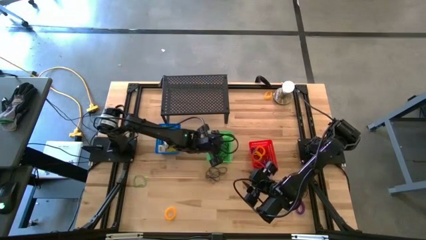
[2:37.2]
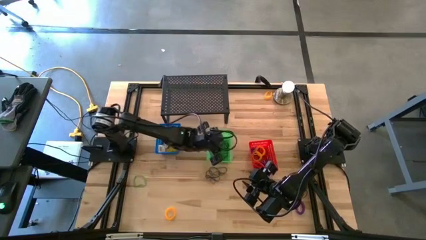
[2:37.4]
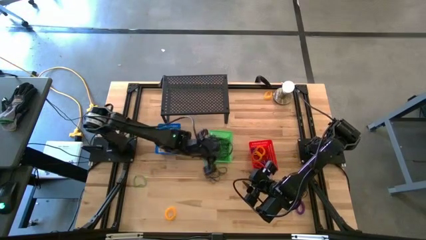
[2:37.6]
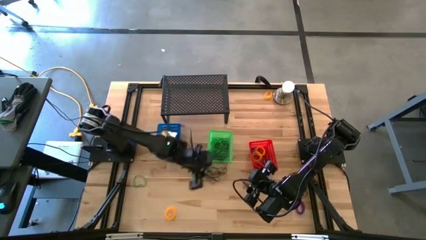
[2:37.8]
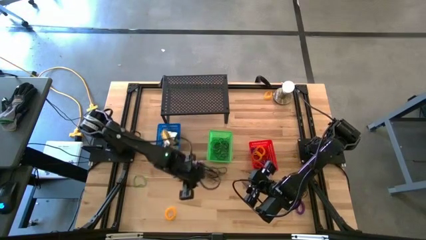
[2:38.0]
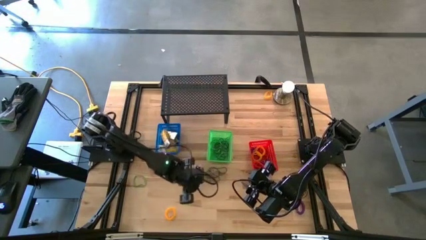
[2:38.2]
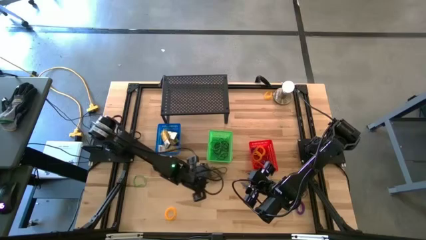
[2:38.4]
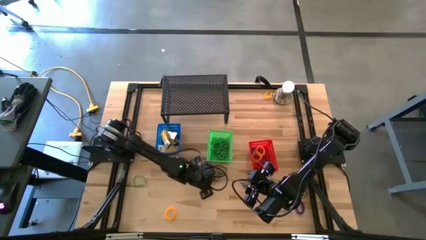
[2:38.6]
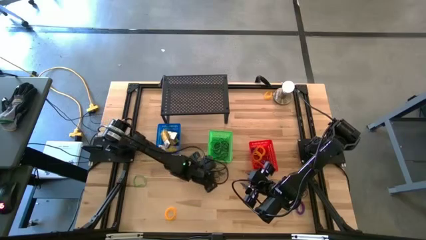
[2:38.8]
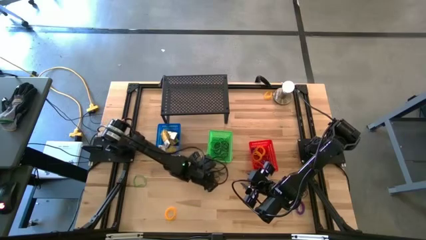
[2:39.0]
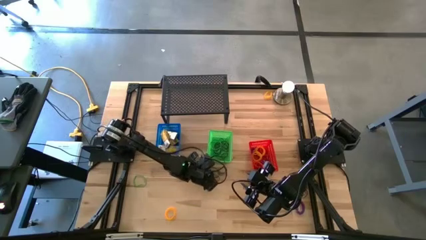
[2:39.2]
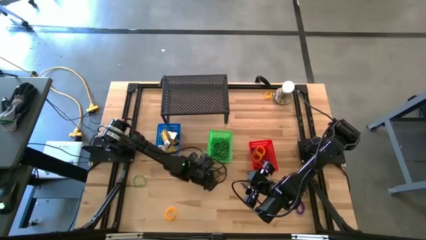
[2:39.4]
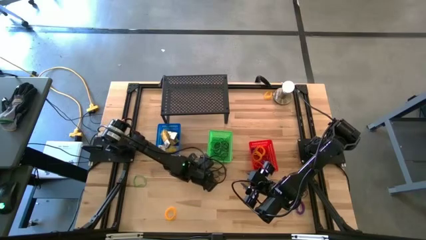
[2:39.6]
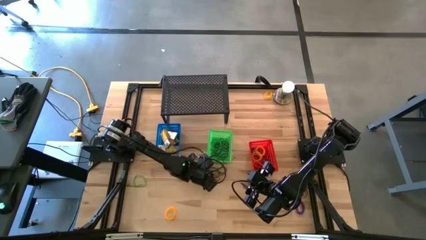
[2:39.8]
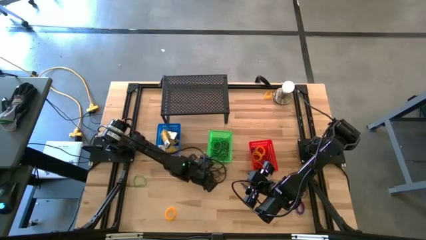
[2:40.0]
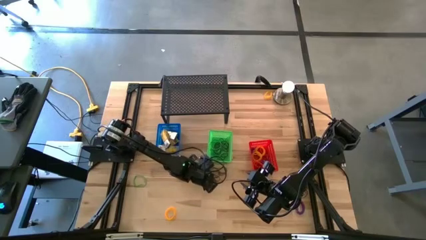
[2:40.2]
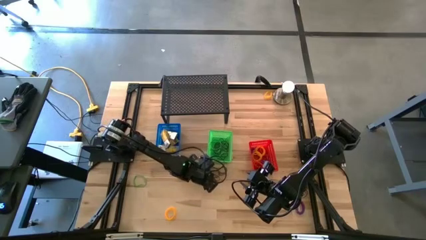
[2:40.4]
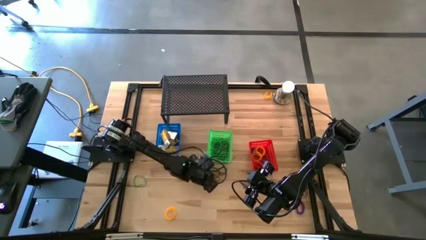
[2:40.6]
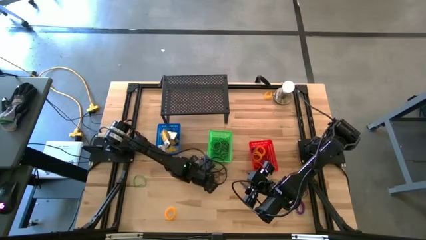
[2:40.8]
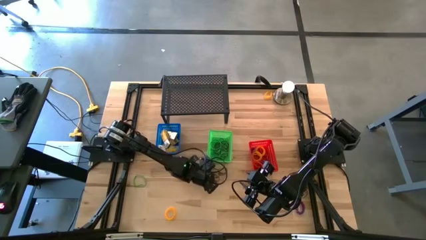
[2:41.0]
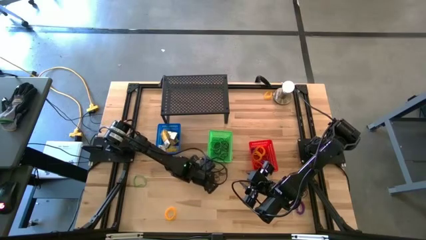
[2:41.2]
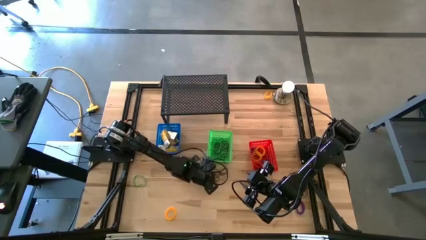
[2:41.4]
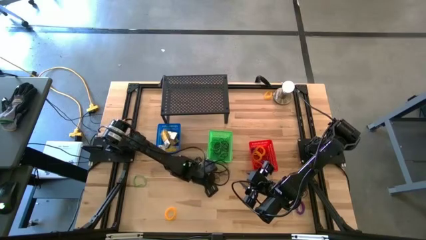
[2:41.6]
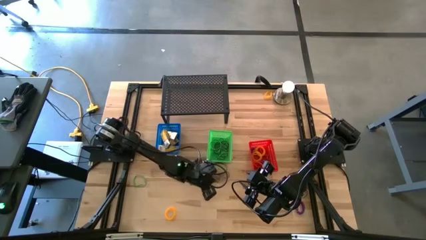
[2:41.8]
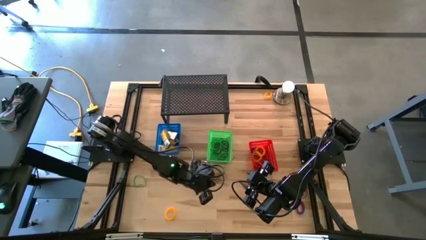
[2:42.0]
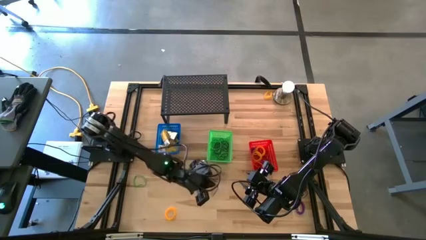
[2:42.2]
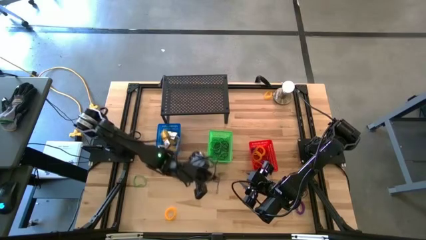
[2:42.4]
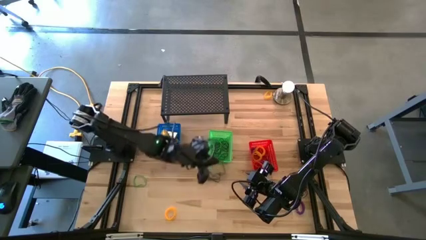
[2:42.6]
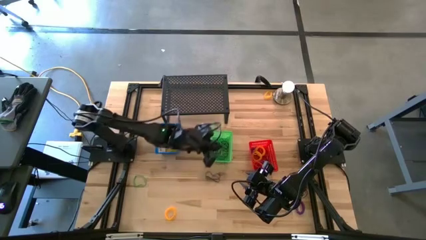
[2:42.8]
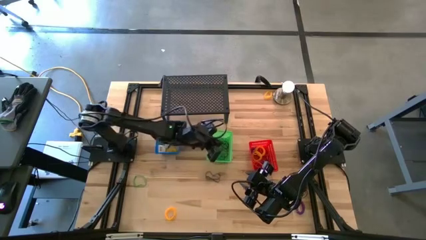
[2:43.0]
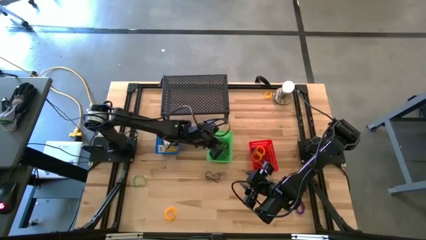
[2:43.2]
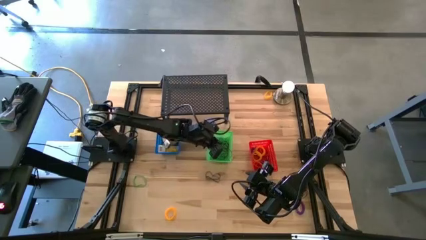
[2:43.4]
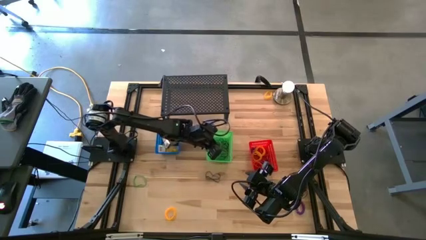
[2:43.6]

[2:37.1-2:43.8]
Task: Pick & Place Office Desk Supplies
Put the black rubber band into the green bin

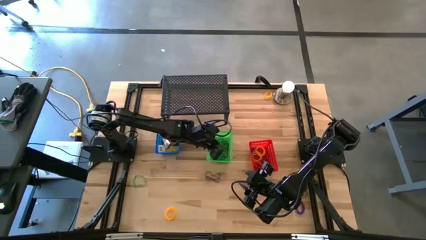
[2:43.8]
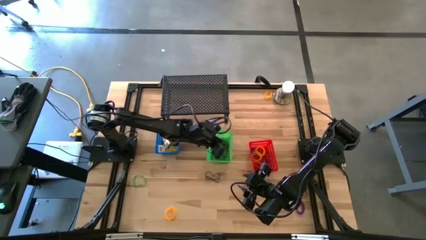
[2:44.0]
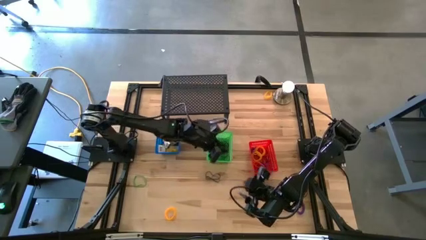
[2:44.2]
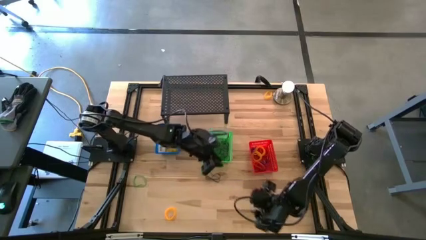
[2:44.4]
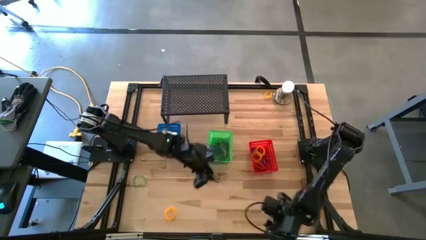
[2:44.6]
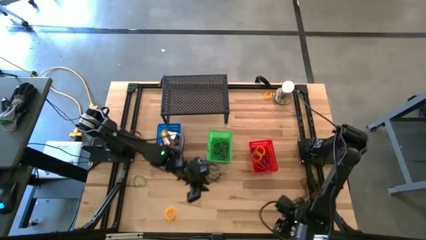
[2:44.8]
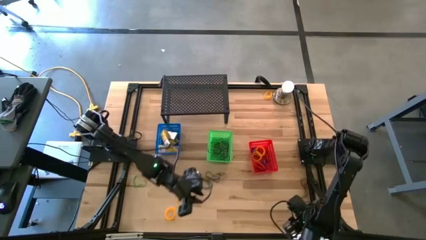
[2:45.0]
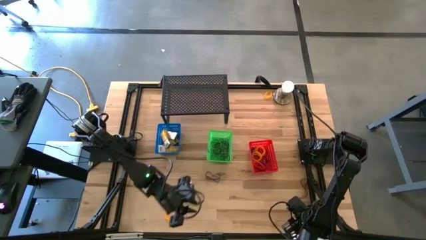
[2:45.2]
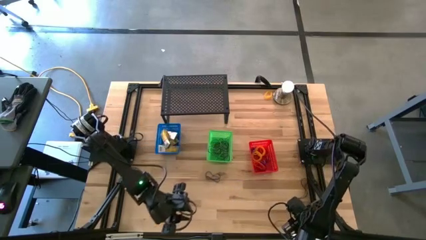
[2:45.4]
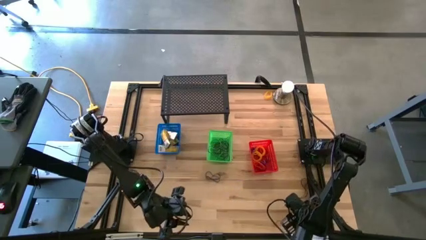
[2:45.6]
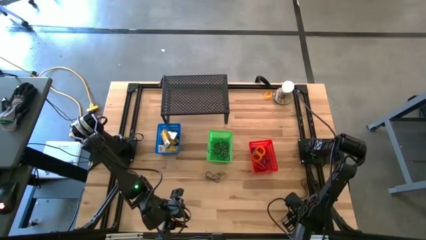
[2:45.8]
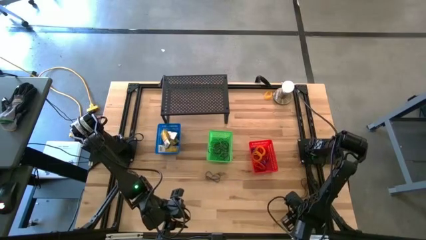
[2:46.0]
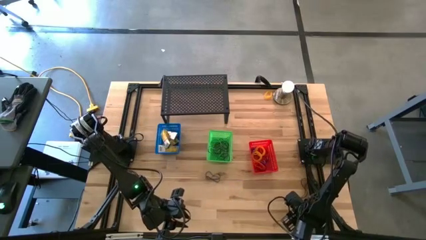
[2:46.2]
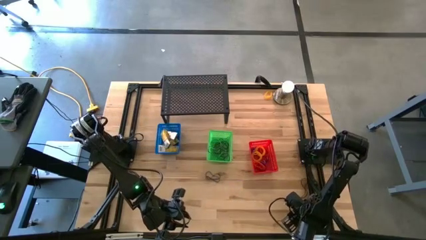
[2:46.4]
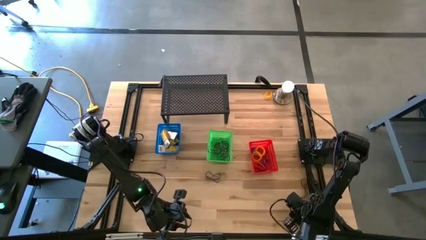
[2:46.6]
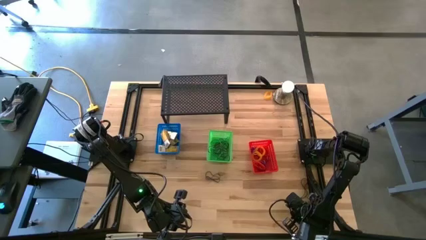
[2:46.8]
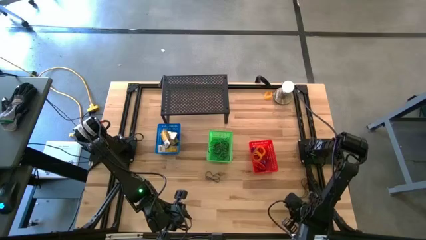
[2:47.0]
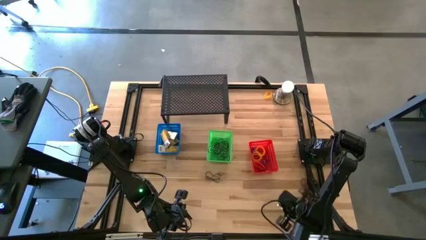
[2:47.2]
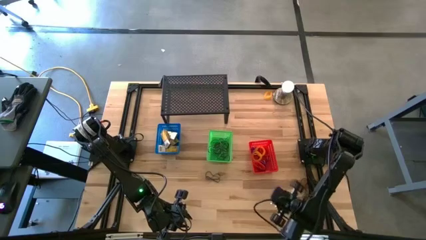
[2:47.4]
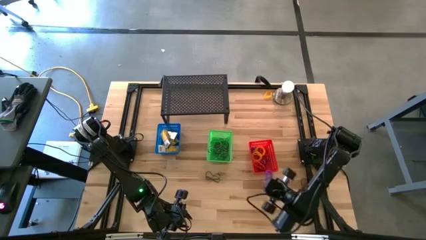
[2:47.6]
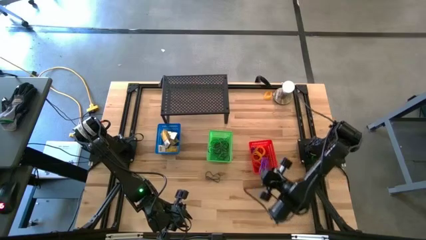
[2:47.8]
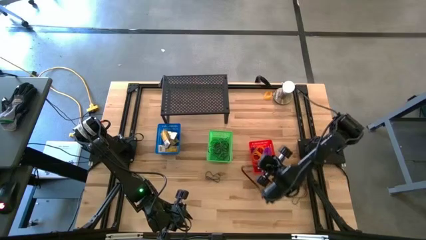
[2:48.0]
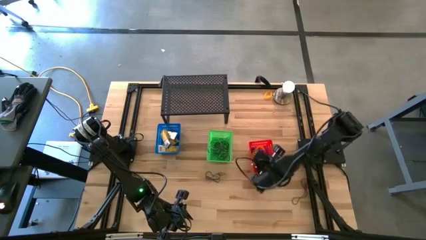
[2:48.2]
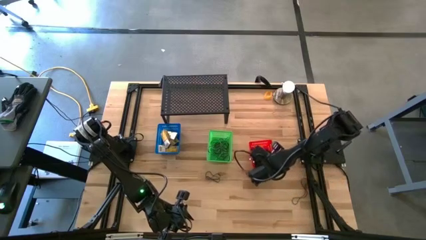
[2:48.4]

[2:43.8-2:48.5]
Put the violet spring keychain into the red bin

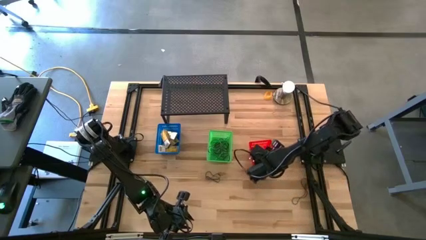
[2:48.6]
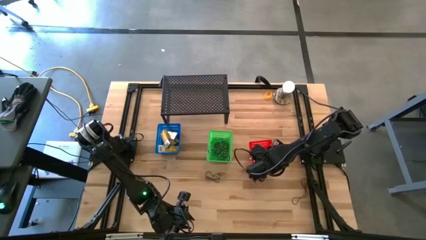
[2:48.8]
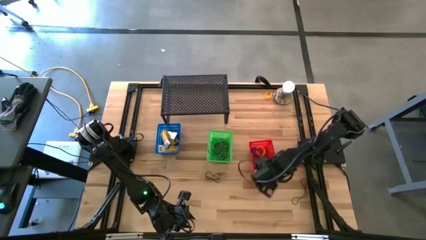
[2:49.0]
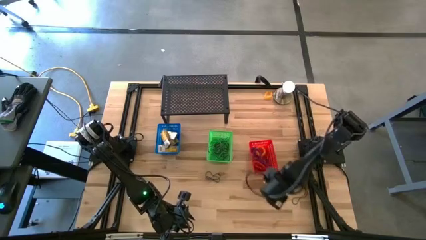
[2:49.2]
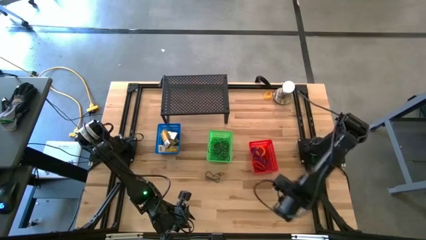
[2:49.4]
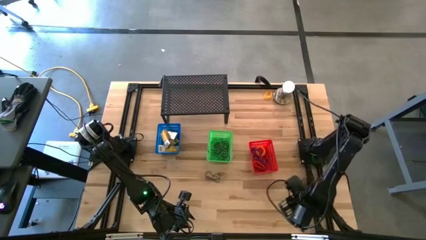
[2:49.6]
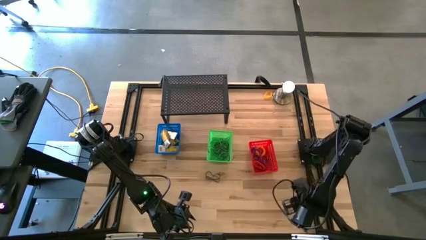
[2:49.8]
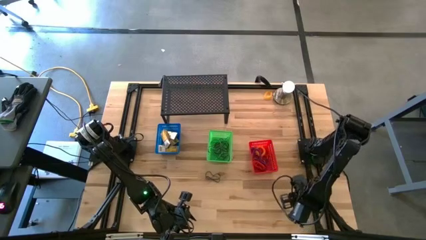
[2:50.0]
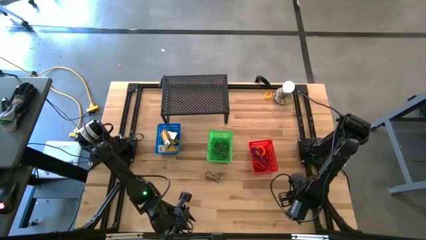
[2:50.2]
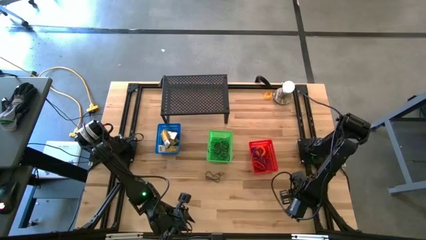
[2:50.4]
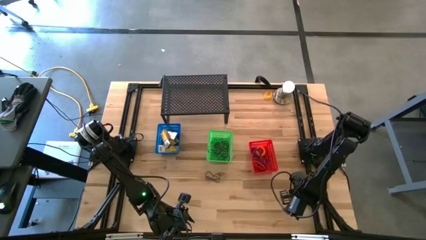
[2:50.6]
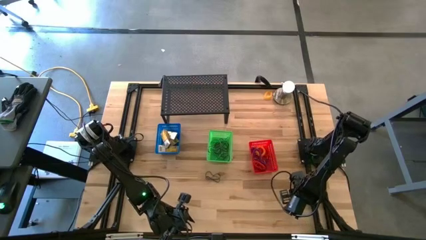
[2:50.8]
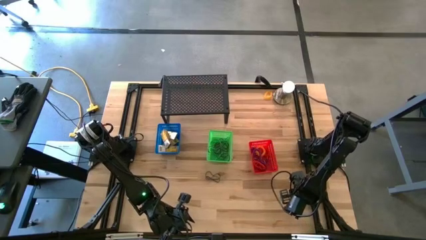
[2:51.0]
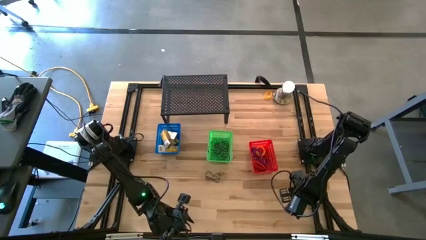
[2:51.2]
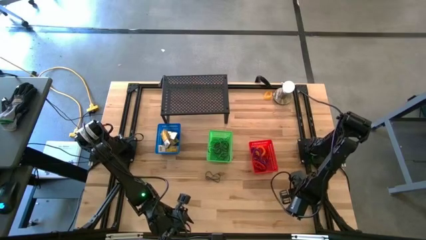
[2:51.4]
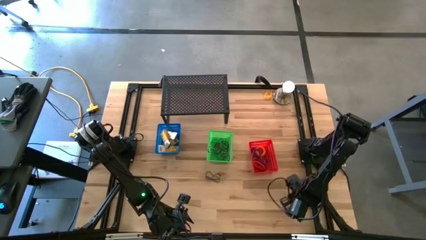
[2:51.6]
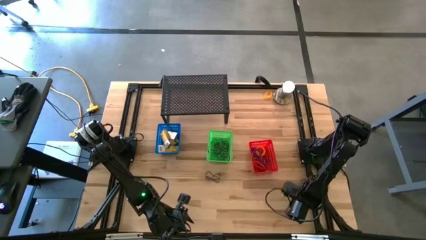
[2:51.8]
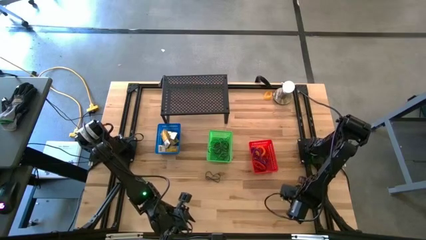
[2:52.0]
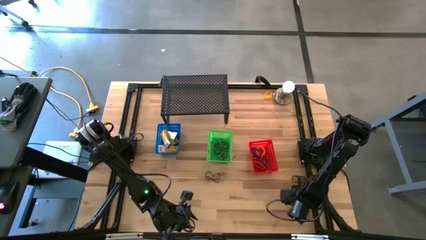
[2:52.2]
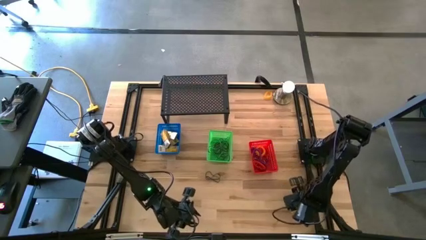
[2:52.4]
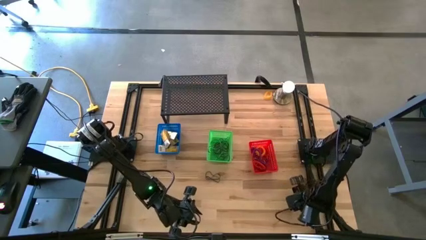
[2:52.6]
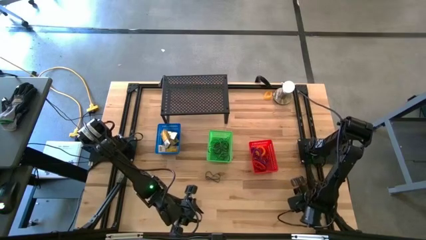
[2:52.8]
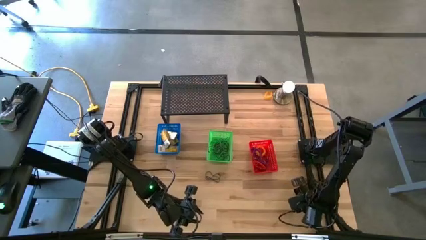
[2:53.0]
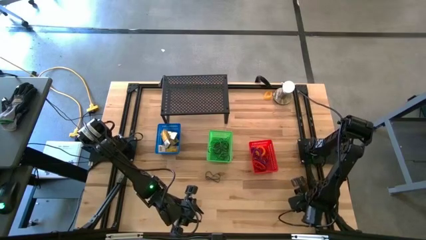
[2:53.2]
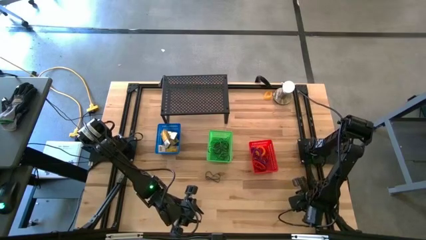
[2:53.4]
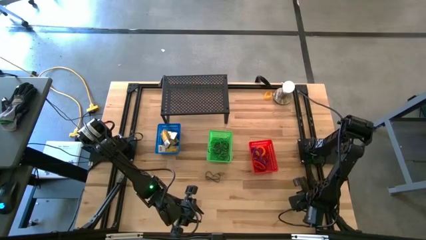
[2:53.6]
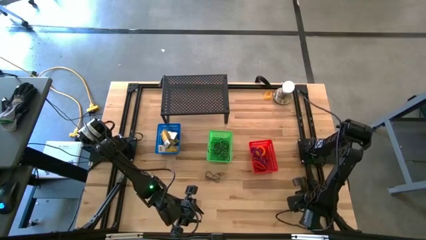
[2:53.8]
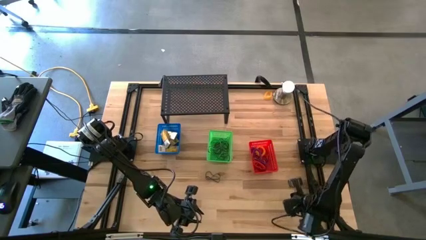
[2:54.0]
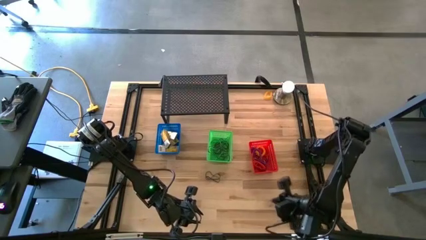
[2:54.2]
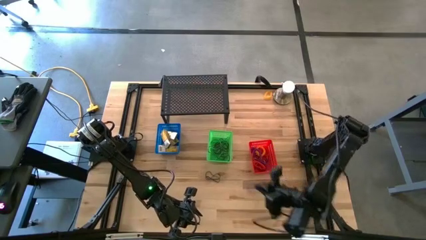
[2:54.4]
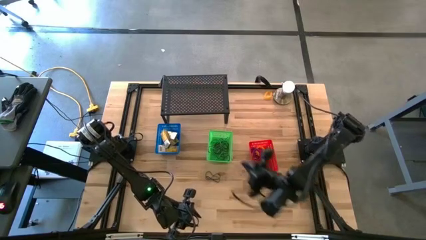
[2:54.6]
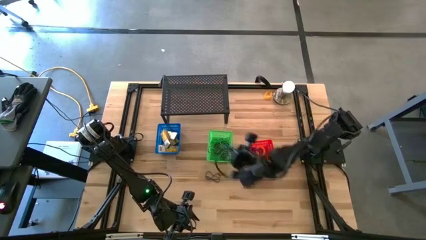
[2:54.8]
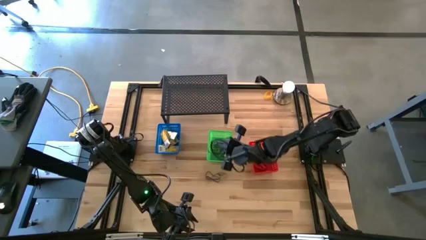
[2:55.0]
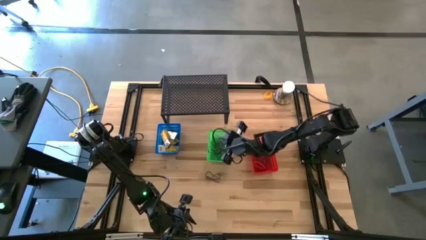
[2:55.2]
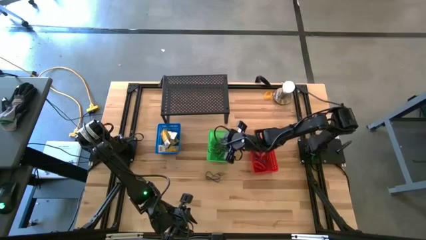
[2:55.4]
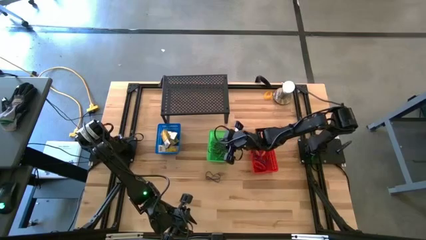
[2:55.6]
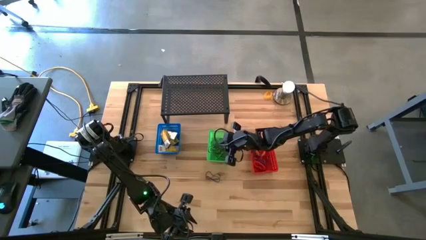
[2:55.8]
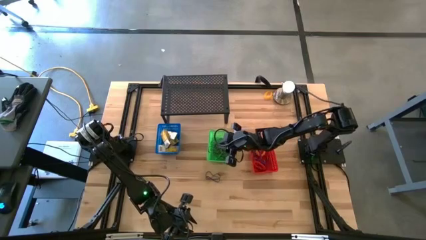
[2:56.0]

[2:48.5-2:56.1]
Put the black rubber band into the green bin
